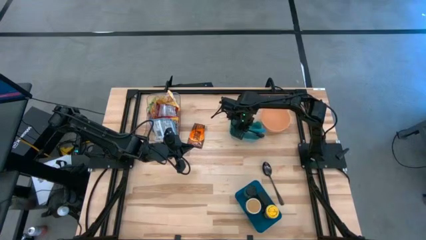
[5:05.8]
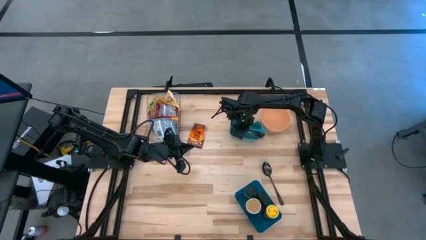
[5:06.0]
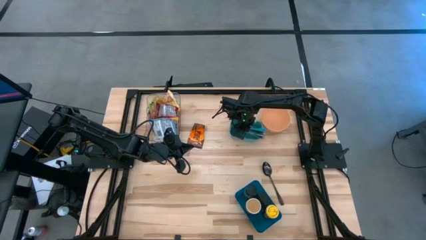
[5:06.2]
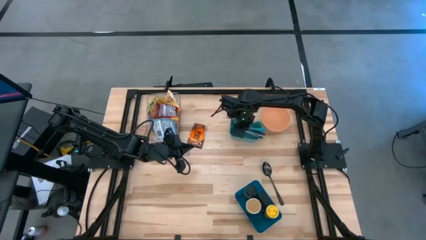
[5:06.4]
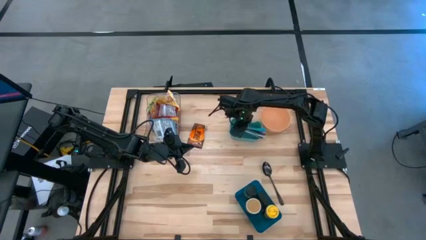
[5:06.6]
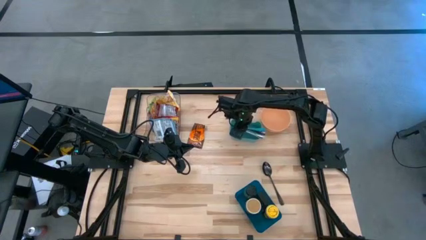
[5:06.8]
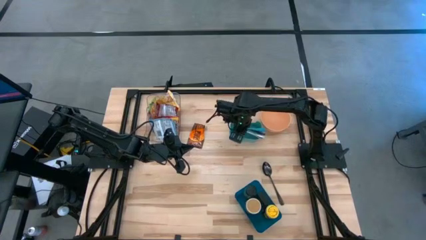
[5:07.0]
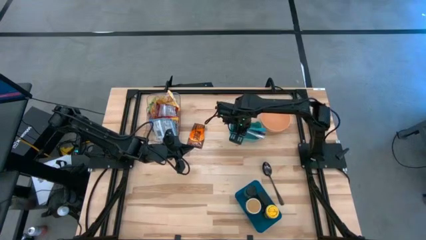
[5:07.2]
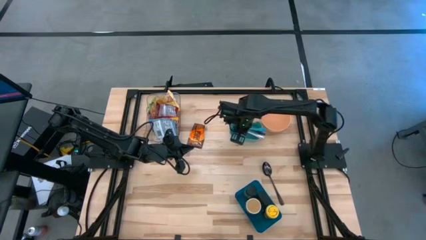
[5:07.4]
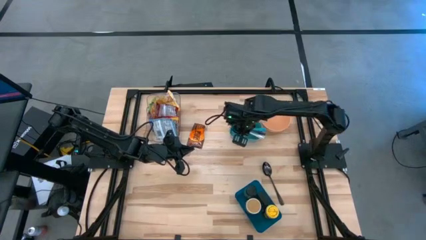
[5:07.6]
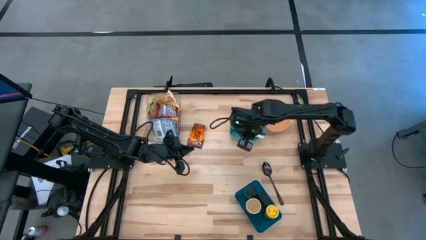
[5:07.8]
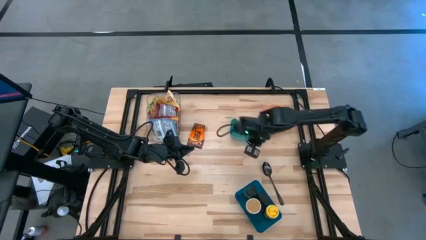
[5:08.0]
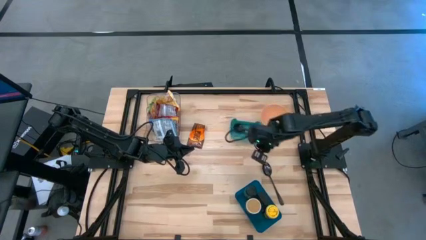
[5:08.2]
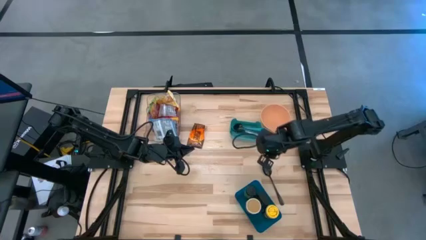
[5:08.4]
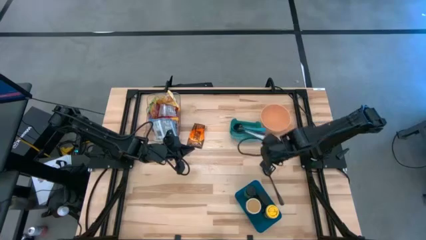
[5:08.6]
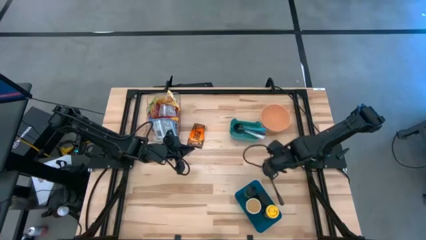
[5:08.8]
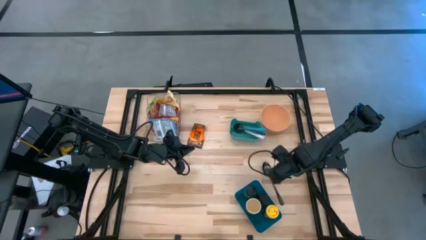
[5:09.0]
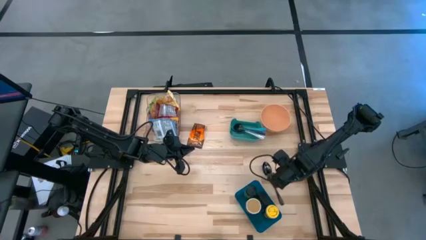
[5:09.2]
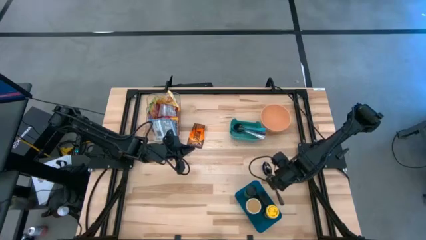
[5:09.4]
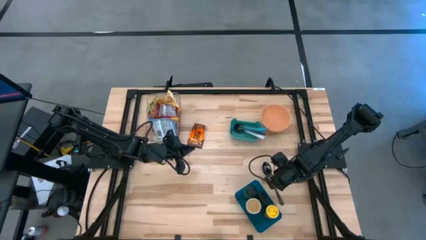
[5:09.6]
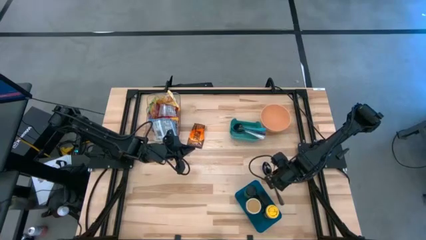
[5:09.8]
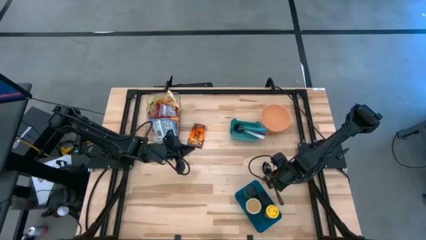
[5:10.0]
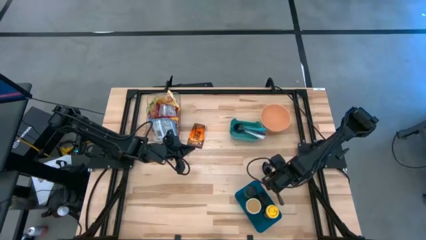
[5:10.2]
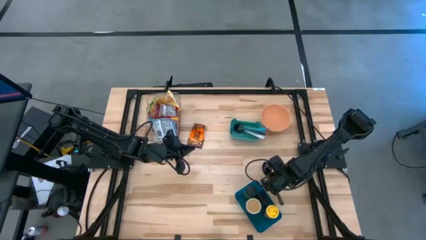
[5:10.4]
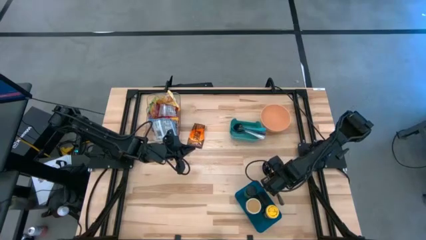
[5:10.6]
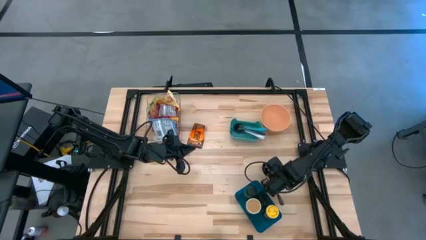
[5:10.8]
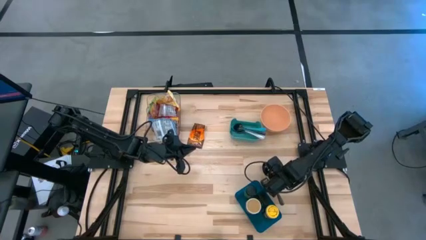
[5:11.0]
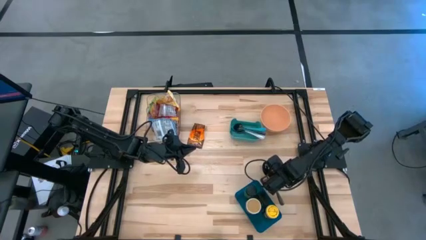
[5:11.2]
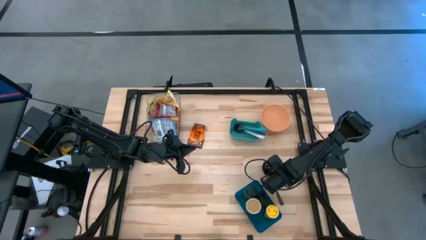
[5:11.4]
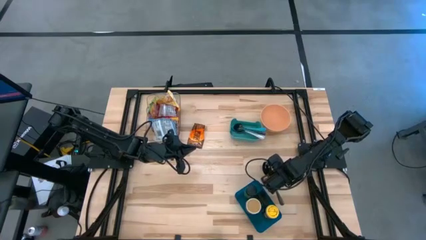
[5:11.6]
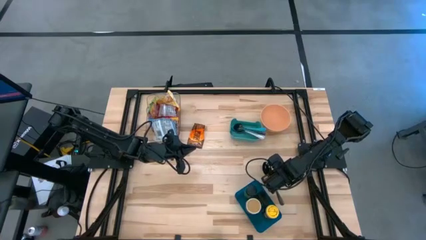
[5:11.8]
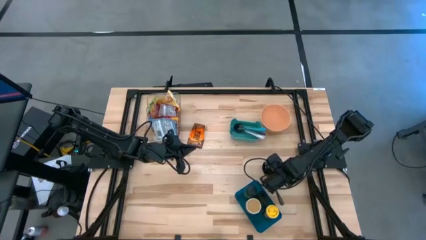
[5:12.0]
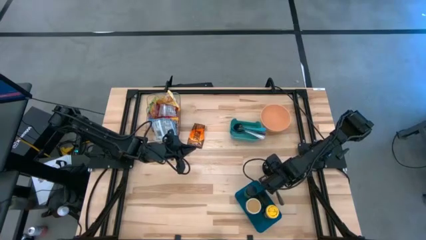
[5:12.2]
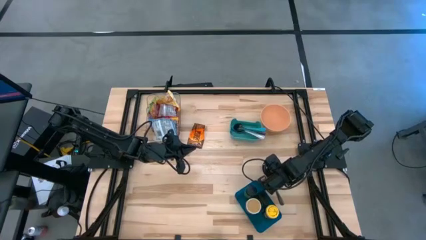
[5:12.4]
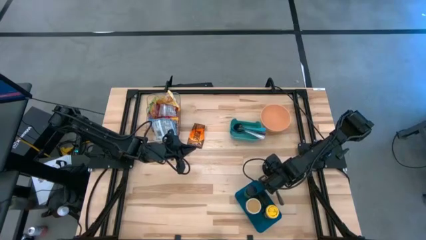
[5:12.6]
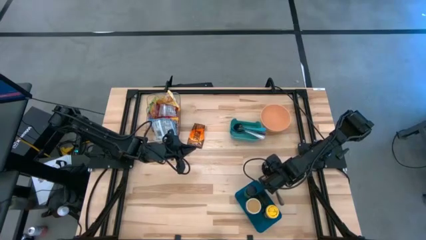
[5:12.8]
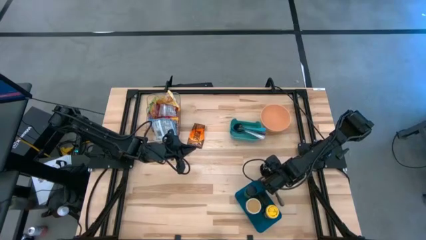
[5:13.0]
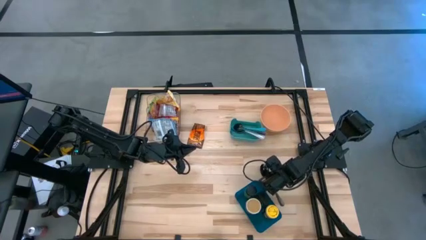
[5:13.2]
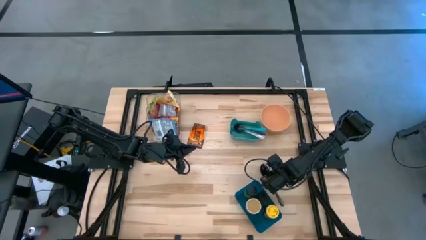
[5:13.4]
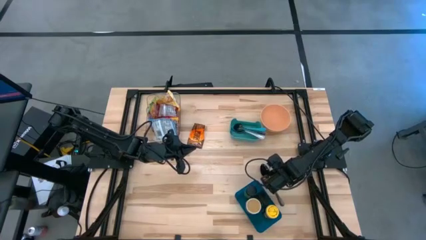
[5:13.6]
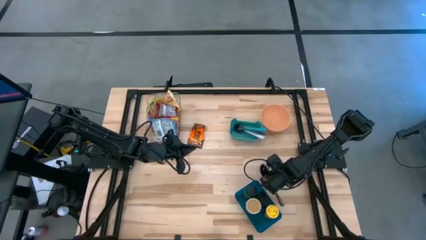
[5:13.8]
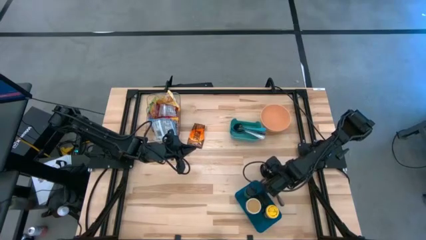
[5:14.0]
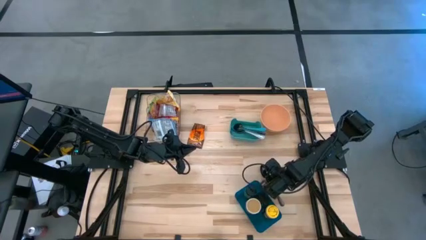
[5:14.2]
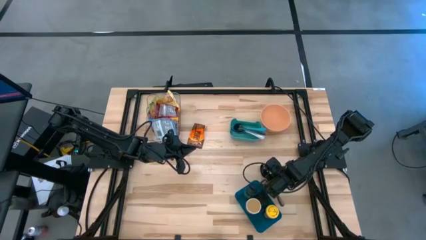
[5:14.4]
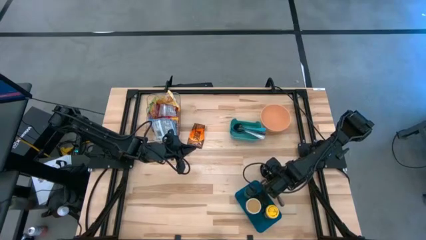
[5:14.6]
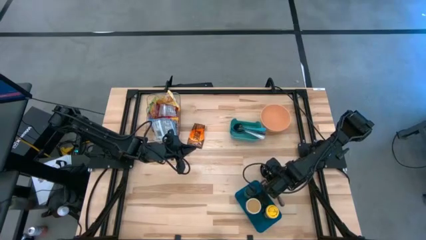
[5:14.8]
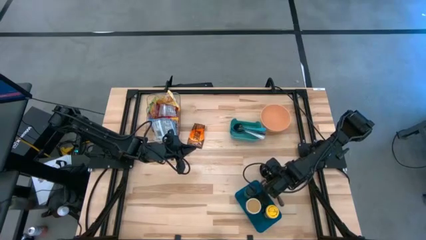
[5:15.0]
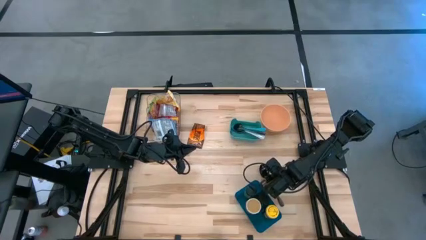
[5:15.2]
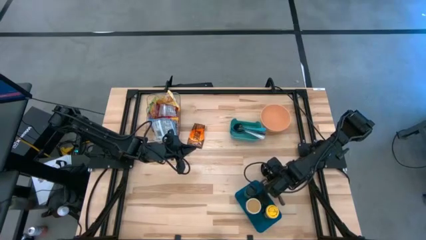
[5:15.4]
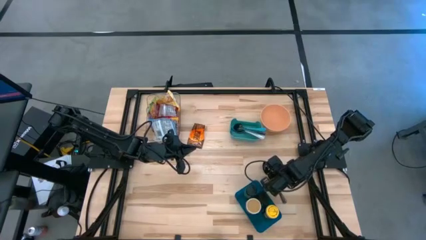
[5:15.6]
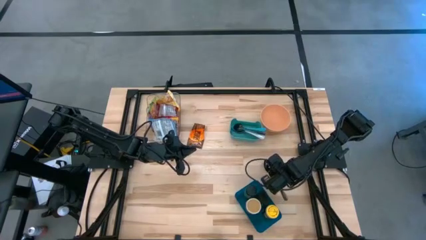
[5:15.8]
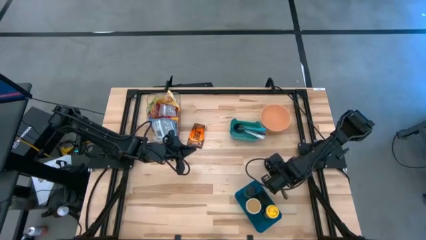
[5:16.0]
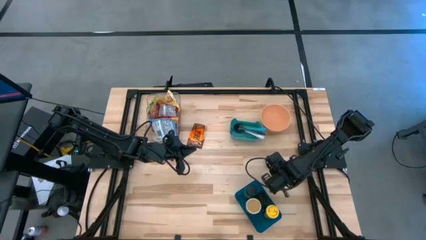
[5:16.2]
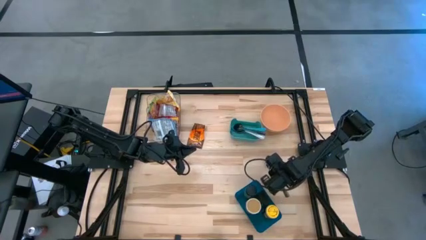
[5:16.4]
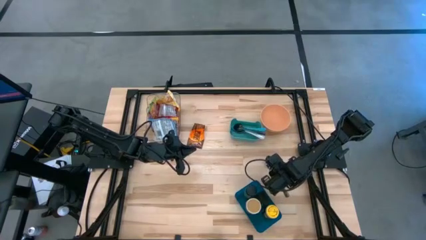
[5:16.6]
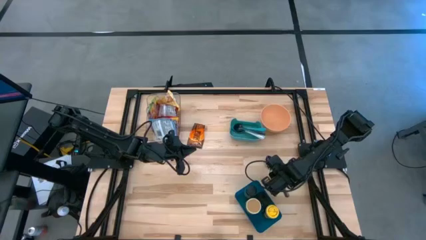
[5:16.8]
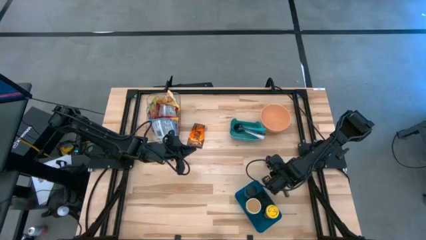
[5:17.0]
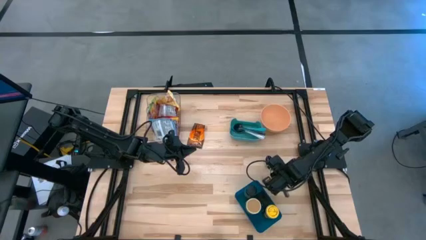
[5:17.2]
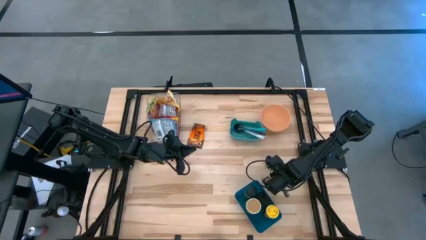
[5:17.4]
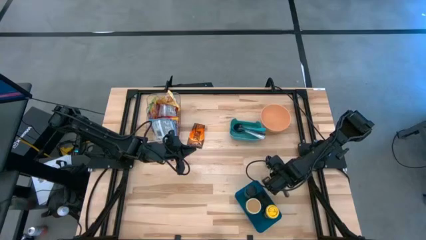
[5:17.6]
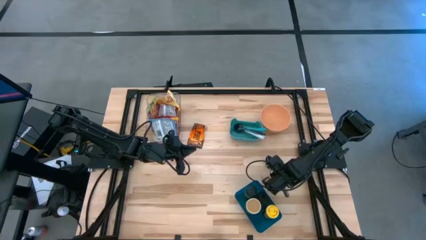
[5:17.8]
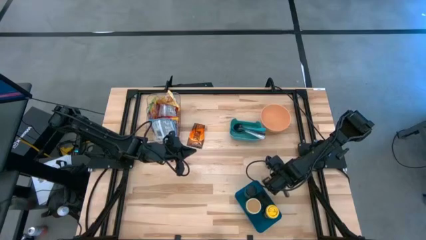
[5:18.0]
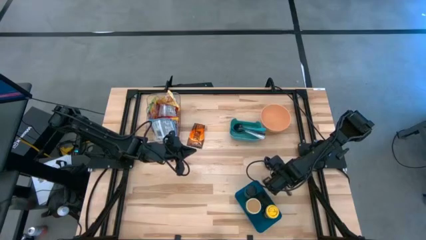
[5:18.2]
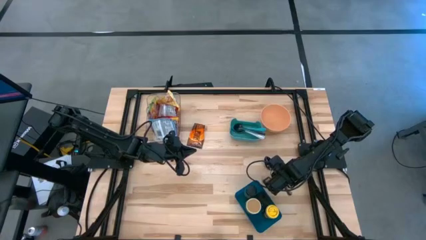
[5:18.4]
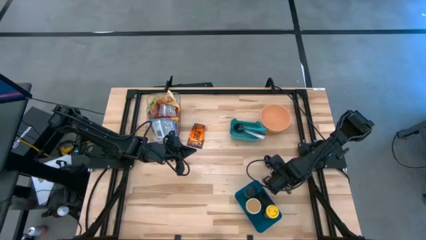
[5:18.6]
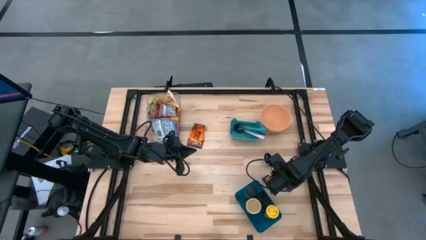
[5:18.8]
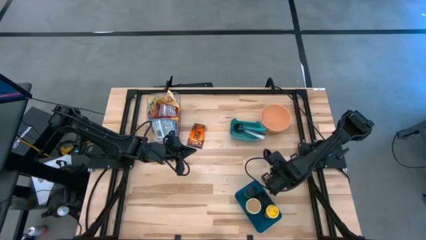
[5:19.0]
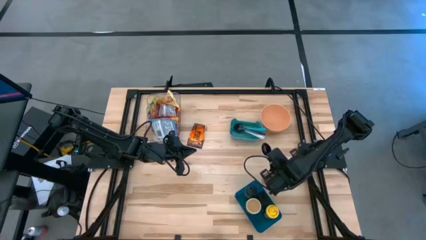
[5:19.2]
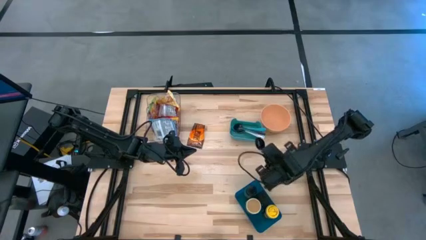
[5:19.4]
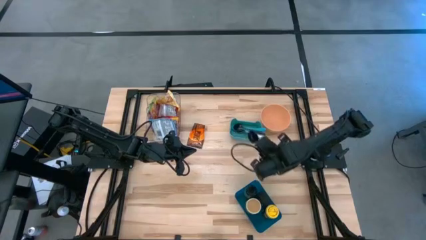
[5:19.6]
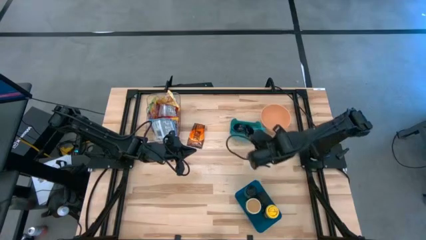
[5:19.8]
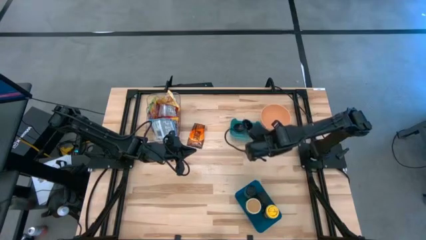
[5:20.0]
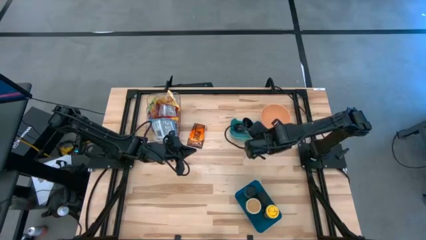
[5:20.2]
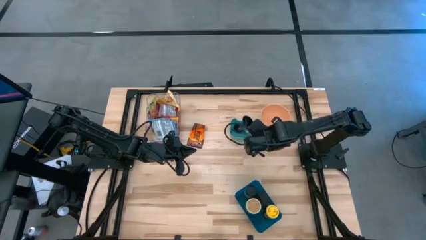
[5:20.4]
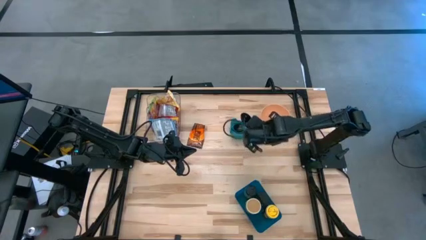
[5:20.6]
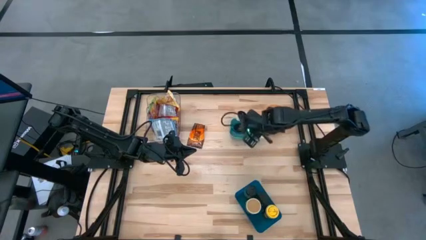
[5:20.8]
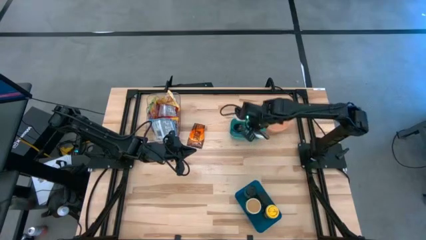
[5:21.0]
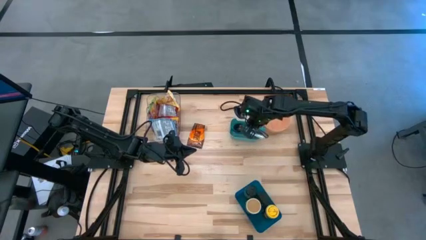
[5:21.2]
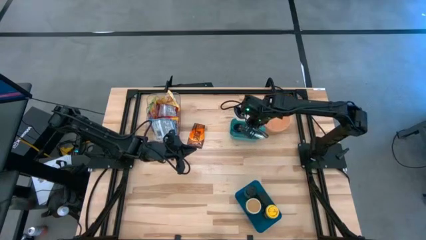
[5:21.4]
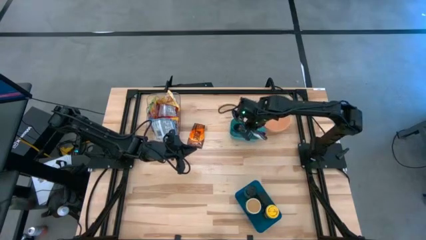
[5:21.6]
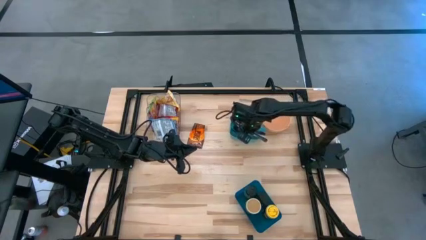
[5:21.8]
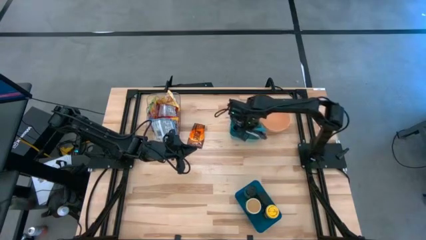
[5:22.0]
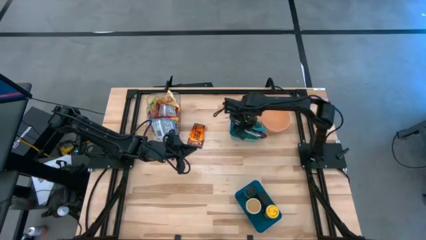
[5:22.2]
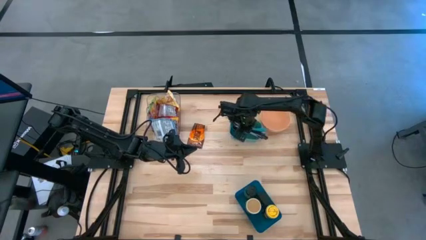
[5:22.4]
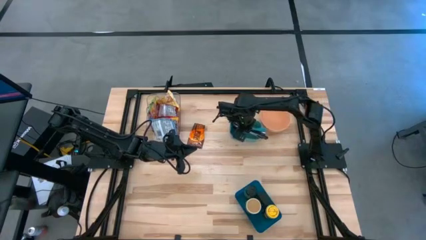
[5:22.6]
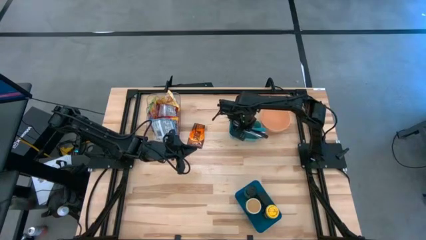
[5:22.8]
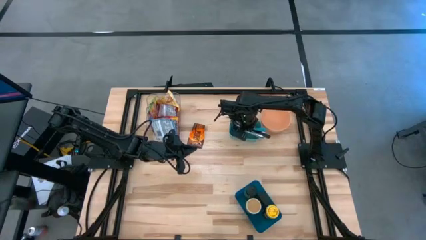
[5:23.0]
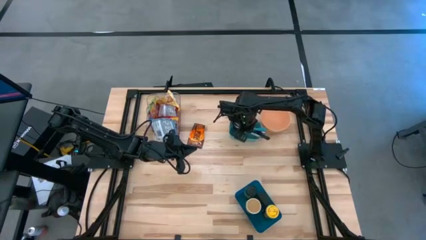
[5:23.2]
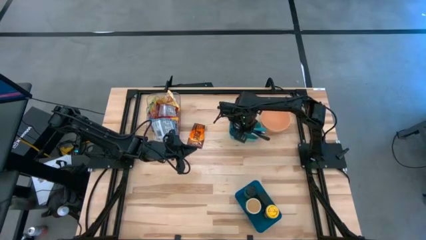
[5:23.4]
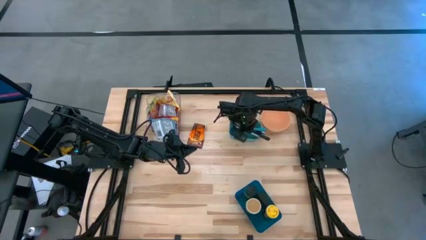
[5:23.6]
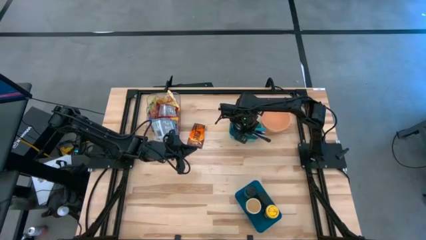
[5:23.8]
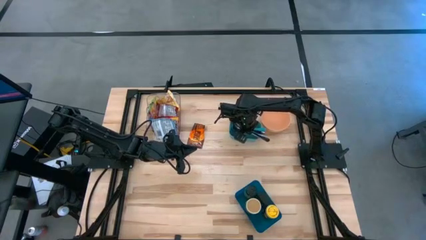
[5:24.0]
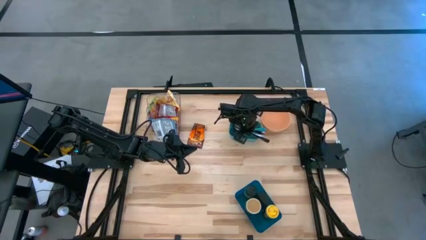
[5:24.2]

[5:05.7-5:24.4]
Task: Pick & Place Food Item
Put the black spoon into the green bin
